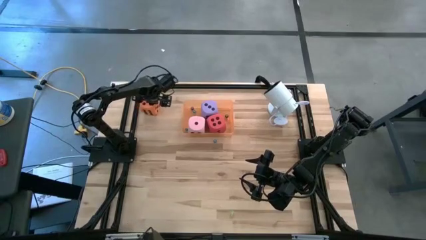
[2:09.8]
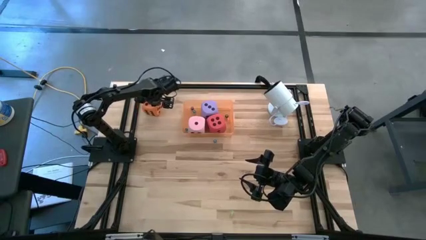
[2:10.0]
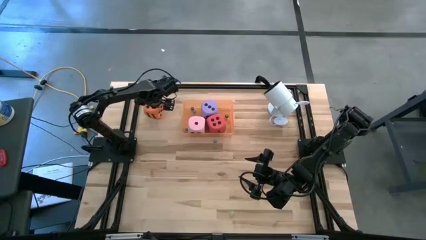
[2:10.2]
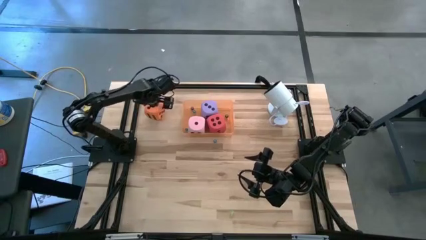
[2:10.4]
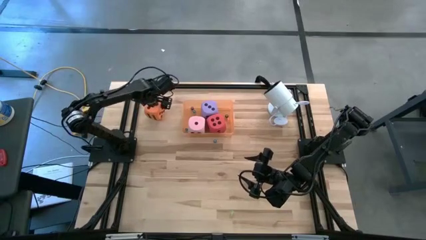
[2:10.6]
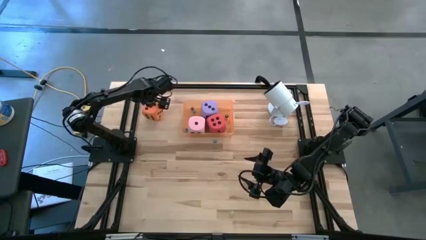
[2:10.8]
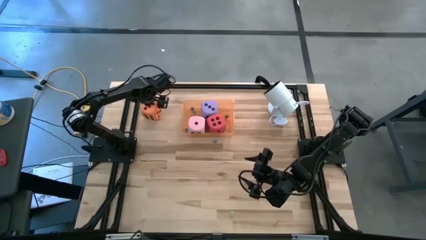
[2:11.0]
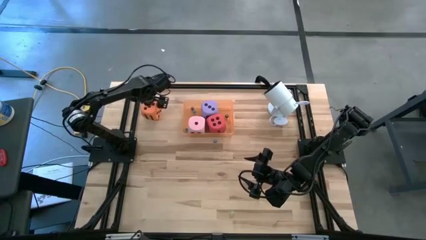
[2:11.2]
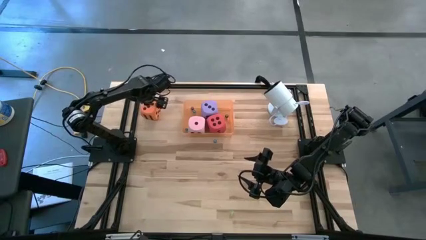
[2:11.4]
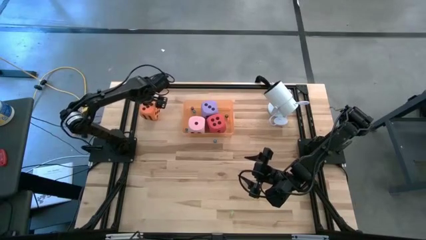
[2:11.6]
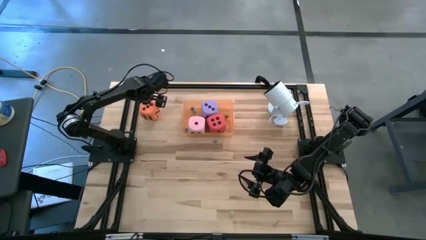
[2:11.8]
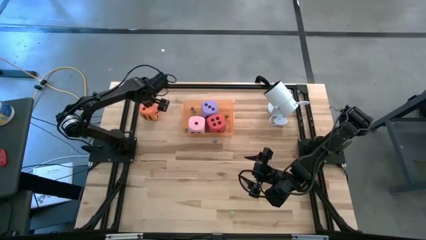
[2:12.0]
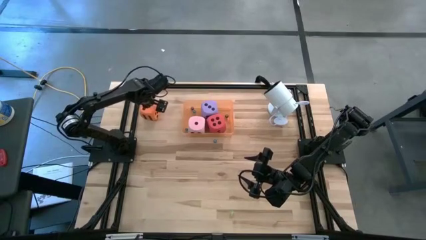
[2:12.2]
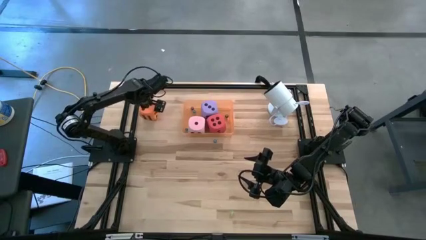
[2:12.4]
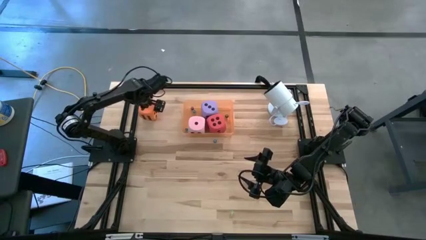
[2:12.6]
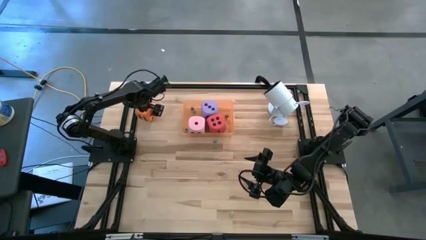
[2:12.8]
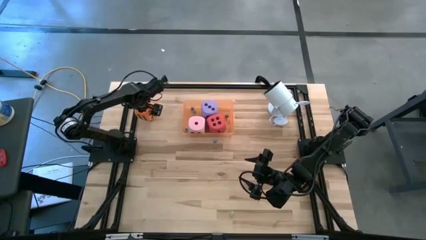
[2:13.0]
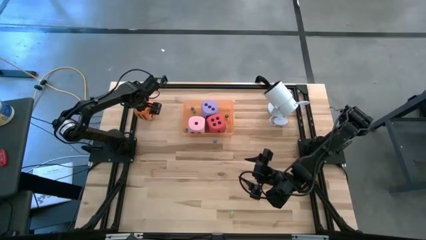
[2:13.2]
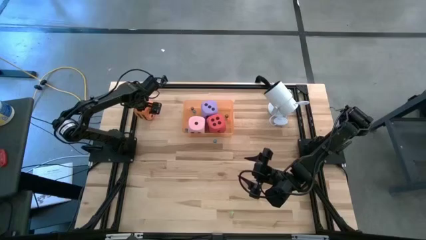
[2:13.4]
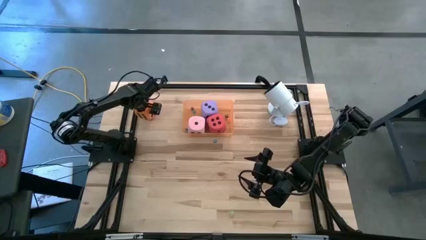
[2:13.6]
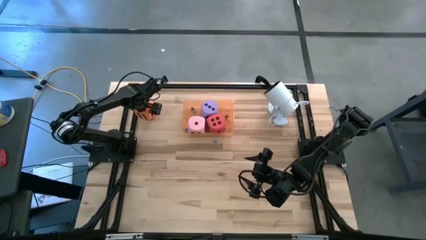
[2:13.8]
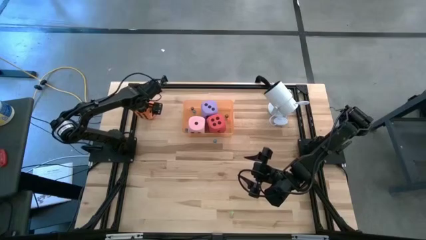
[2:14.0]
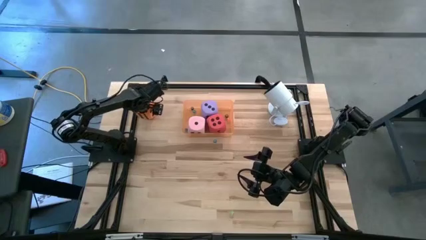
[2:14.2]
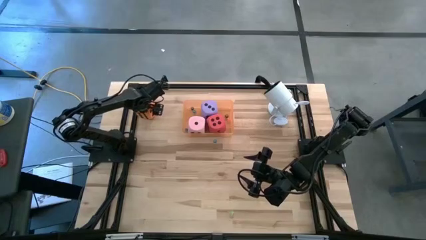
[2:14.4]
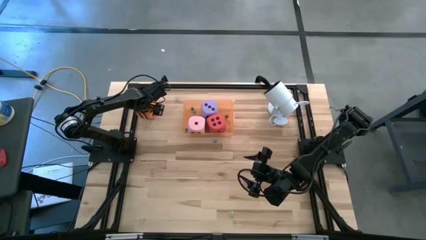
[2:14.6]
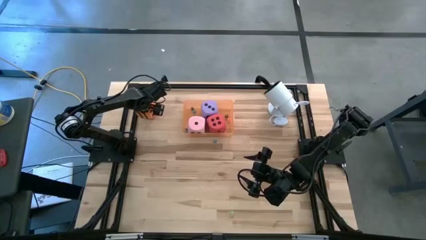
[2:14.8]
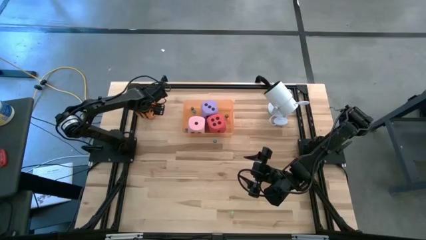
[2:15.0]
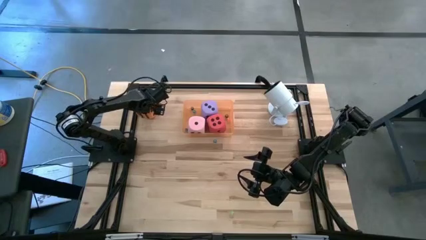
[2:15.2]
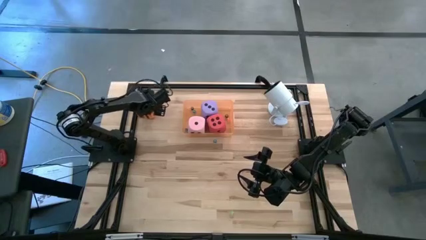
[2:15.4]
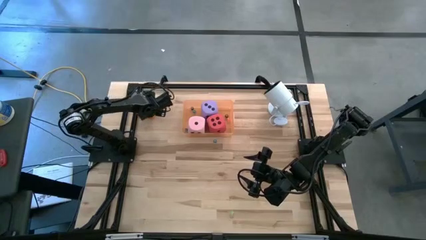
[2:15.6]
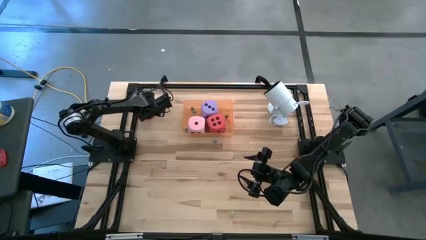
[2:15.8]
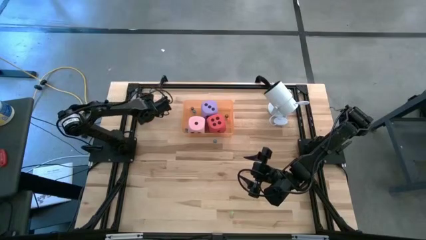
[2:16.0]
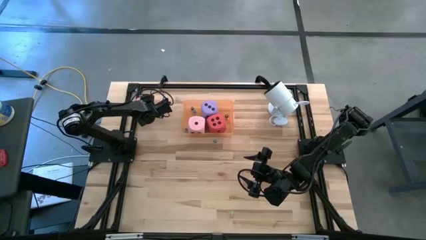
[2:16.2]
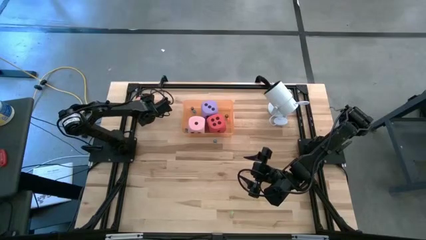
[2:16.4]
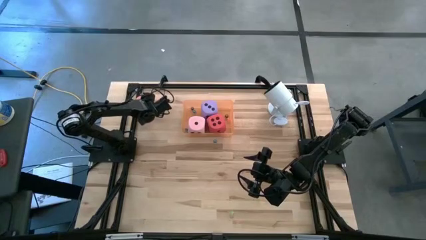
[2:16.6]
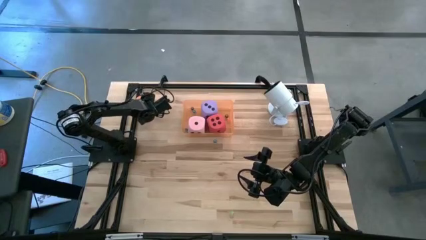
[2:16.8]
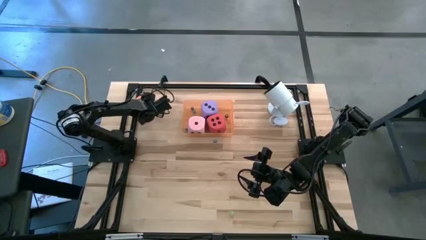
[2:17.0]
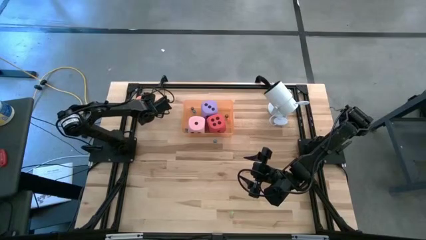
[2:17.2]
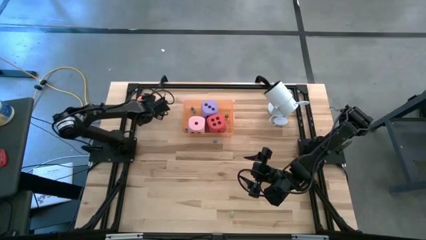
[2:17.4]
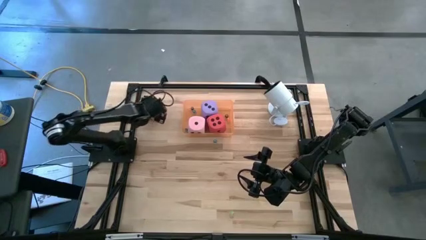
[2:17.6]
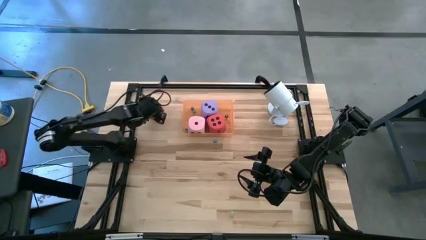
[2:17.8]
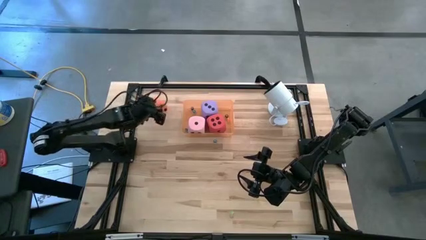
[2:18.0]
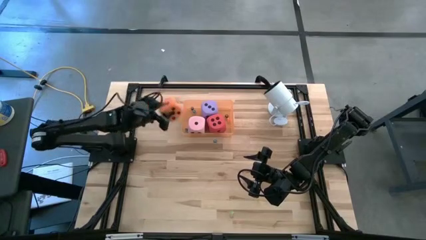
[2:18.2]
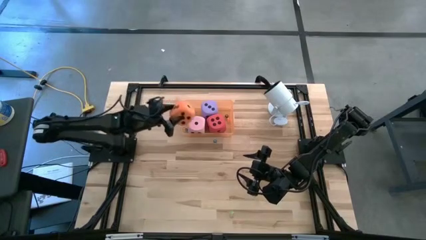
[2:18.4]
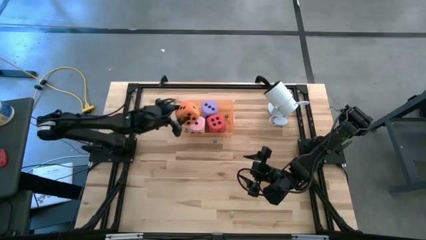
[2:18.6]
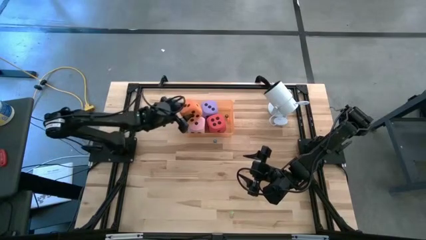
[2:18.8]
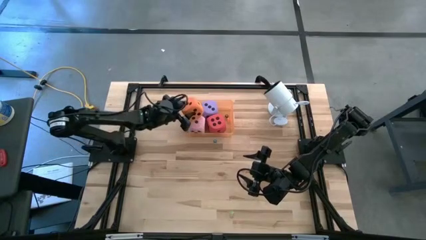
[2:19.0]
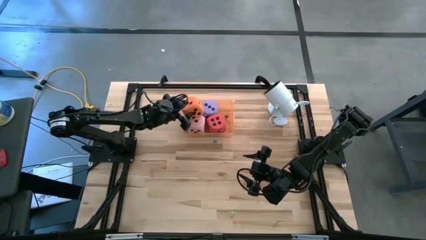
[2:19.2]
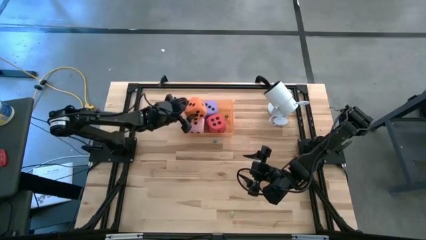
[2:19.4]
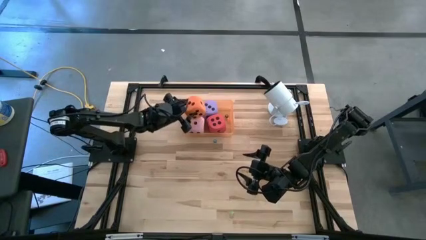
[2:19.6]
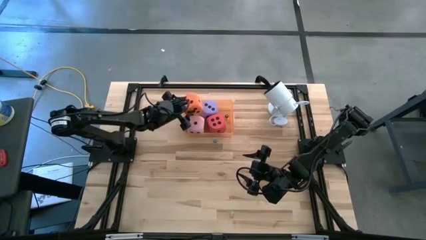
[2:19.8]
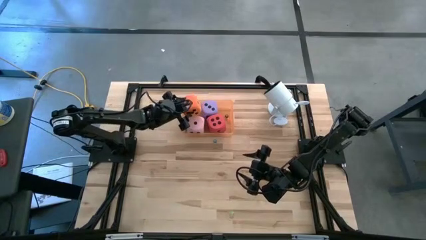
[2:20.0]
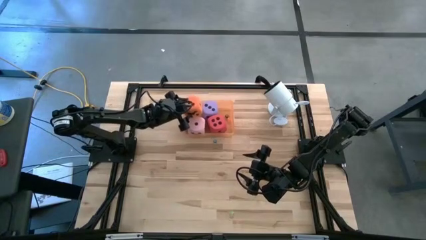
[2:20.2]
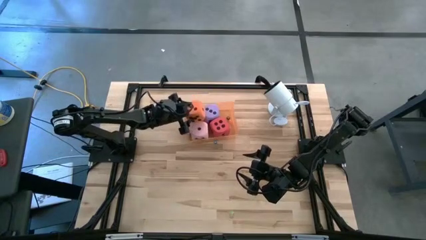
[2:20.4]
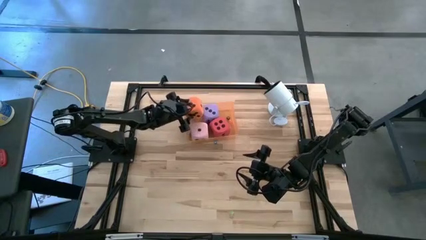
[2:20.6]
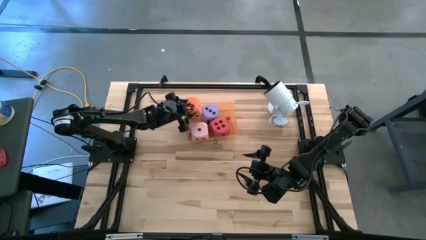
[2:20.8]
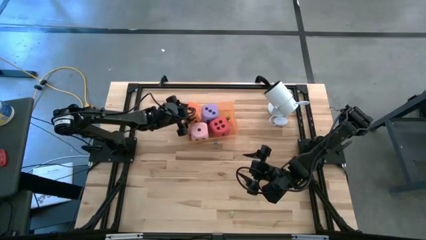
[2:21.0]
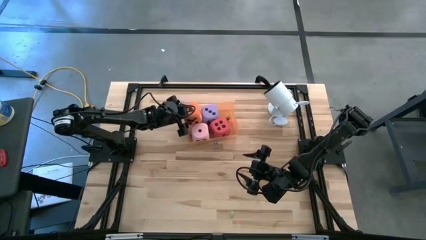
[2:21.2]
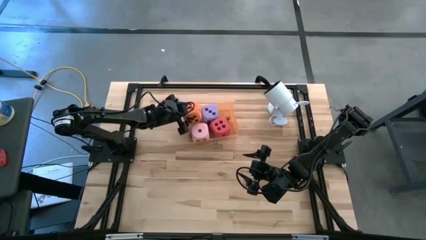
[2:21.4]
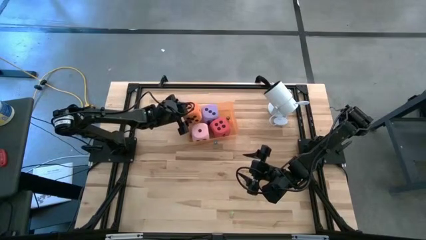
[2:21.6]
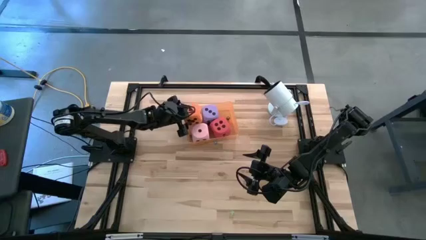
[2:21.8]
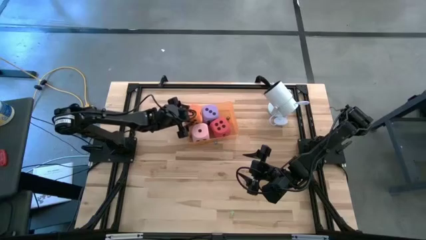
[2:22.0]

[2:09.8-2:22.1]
Task: Pick & Place Dice
Put the large orange dice in the orange bin

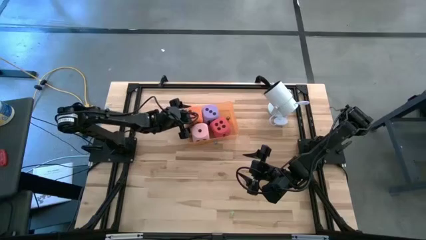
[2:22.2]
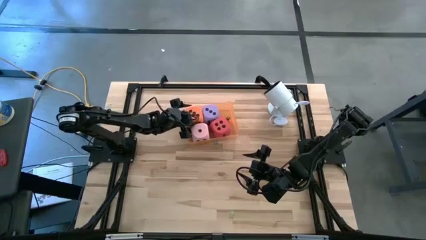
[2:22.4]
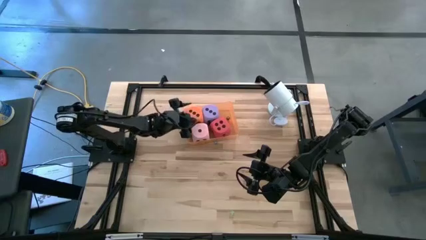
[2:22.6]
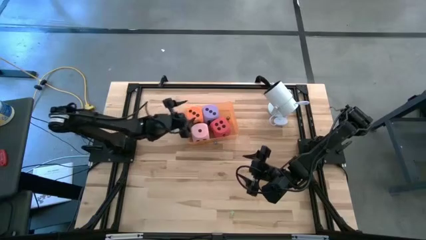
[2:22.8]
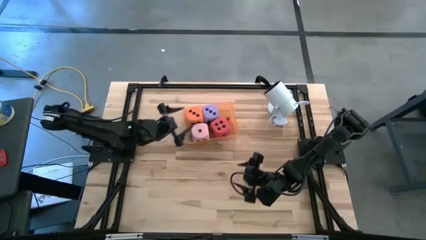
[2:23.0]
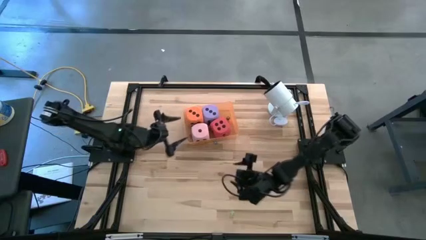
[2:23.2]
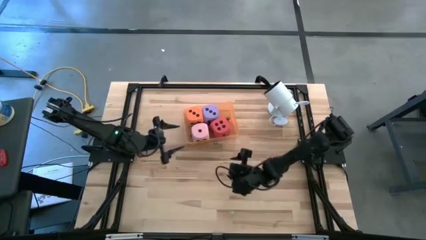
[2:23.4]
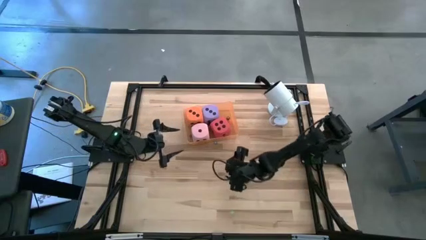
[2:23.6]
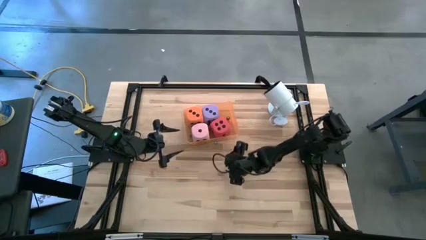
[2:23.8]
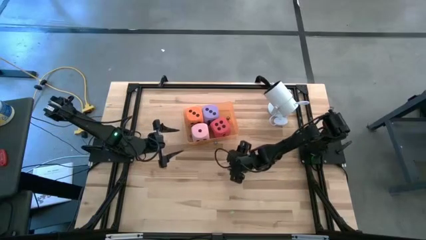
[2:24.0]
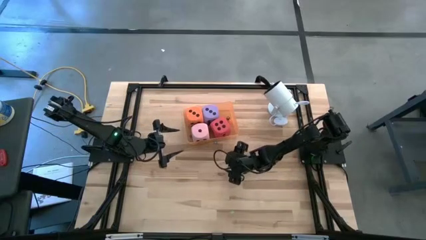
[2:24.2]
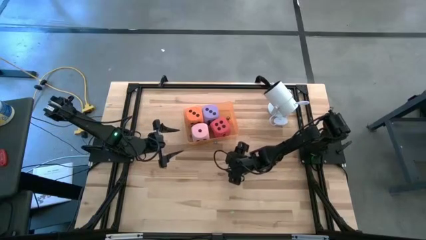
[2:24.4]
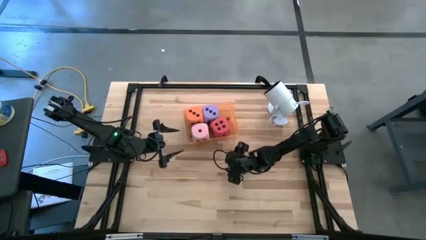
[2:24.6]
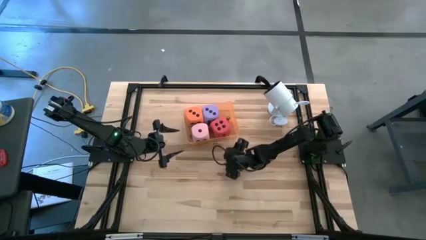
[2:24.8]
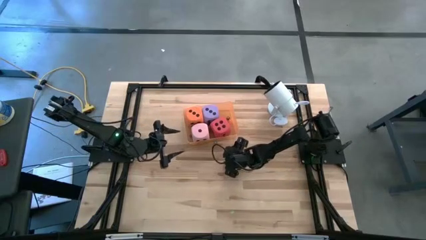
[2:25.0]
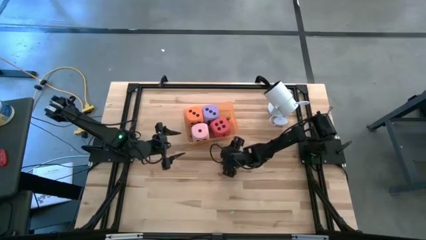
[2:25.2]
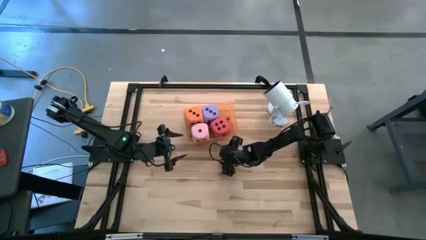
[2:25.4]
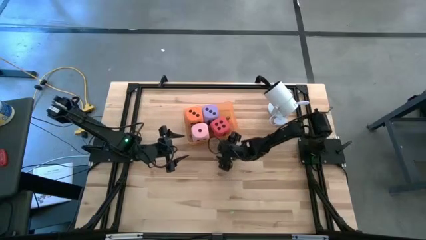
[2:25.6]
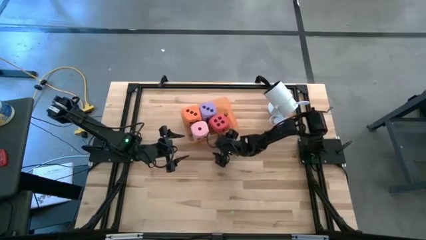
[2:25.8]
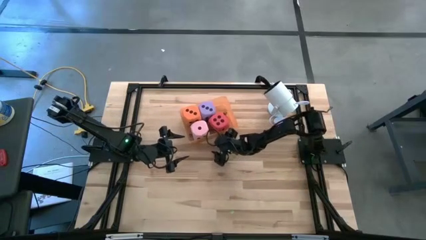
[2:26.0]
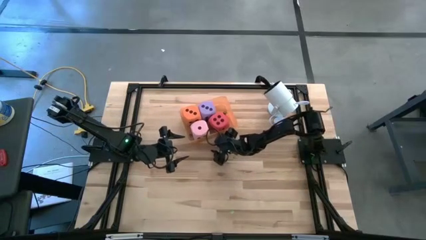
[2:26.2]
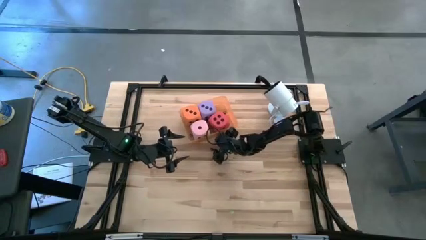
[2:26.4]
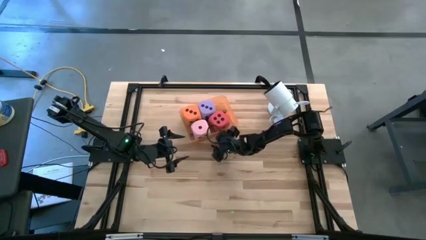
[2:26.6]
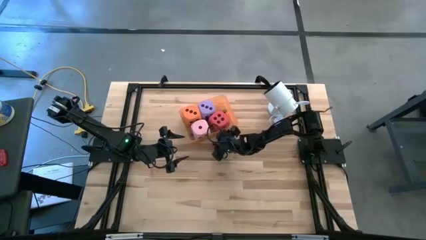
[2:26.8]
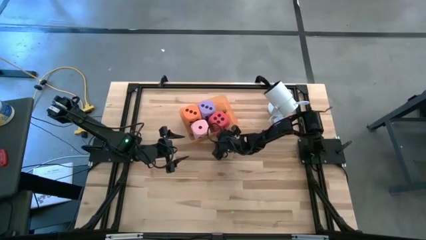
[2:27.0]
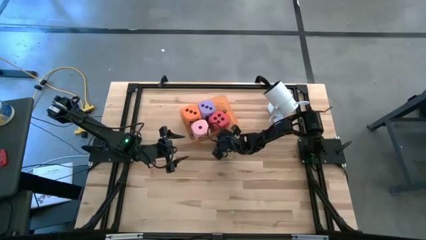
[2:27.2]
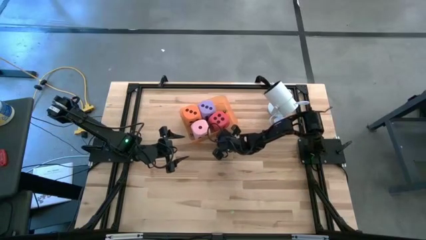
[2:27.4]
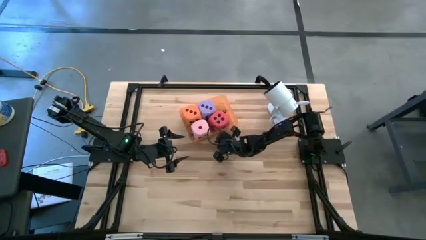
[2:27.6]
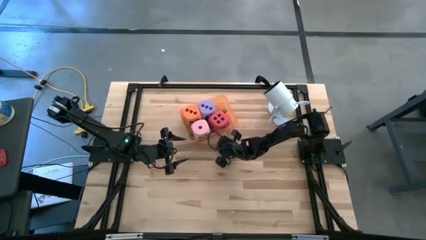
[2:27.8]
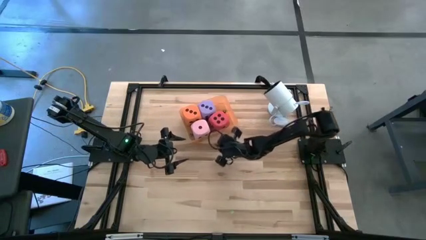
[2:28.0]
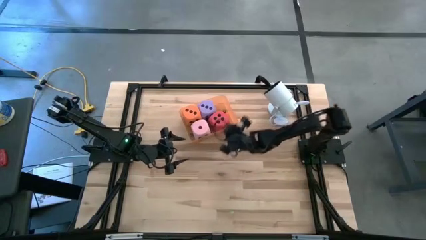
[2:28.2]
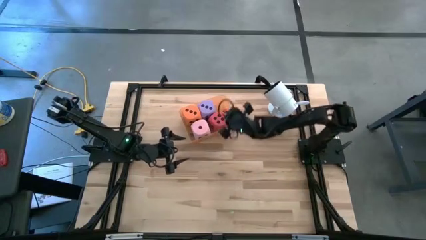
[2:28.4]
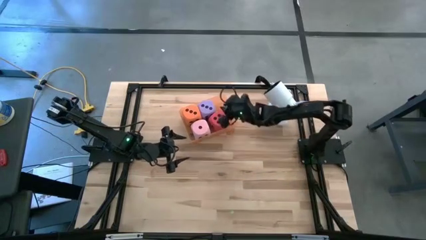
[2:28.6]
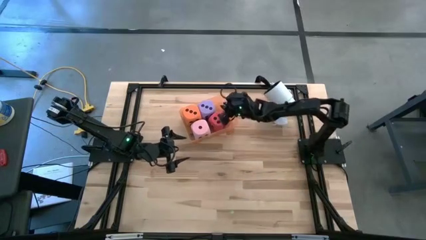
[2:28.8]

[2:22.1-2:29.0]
Put the light blue dice in the orange bin
